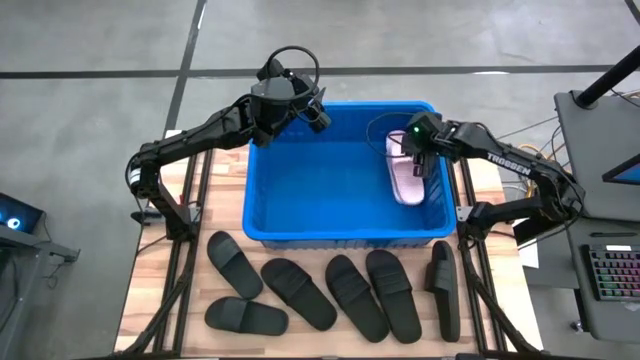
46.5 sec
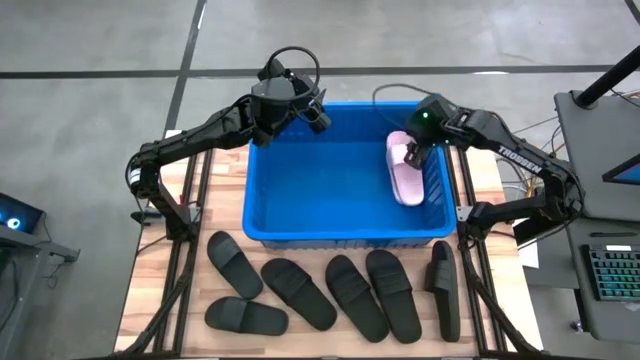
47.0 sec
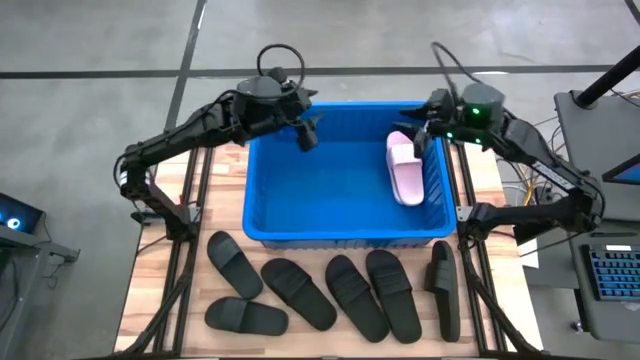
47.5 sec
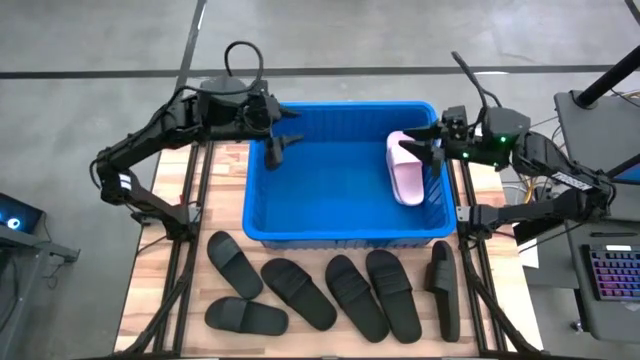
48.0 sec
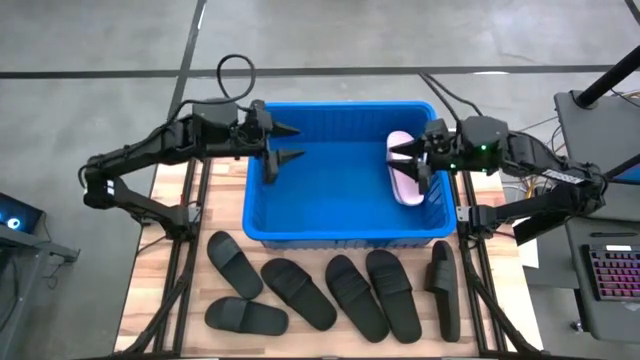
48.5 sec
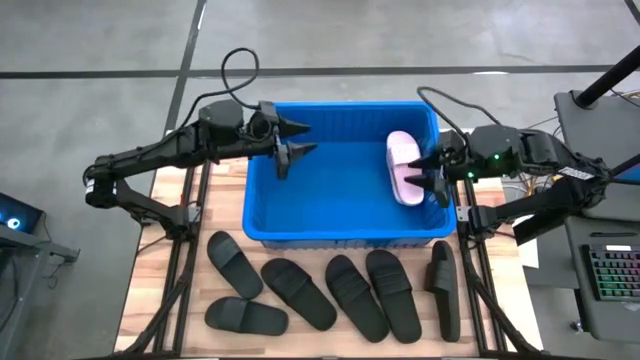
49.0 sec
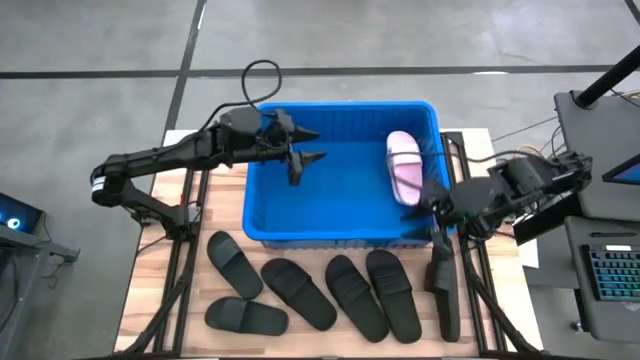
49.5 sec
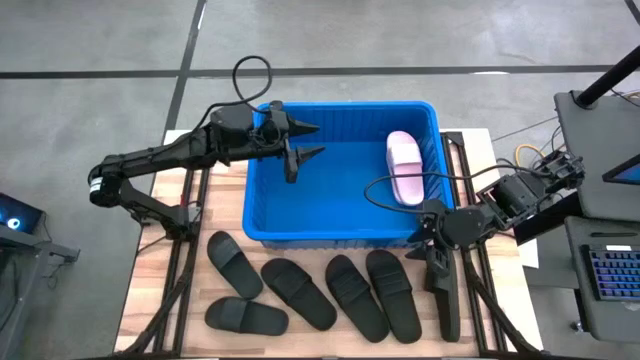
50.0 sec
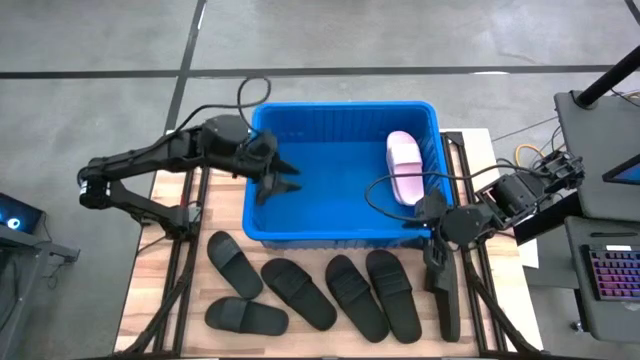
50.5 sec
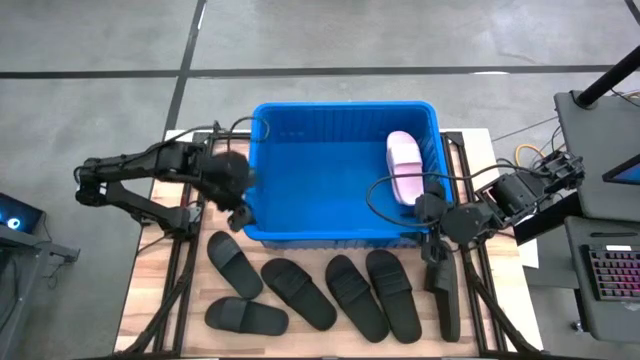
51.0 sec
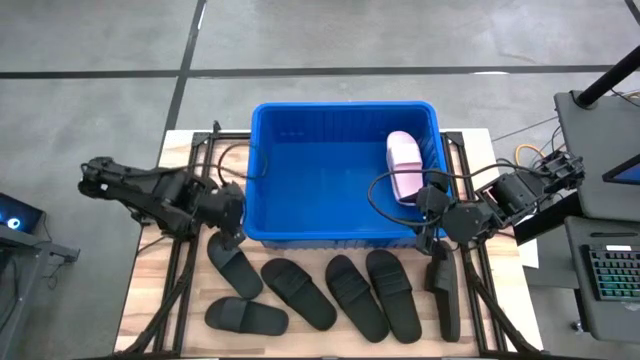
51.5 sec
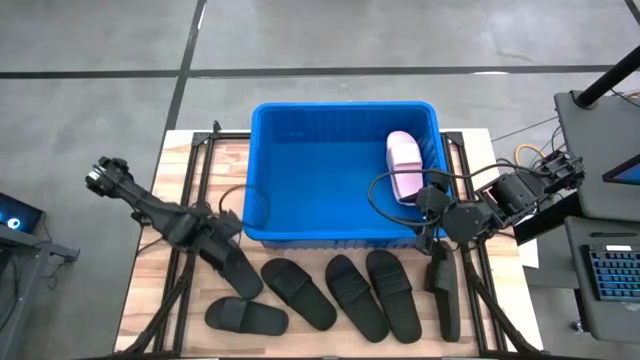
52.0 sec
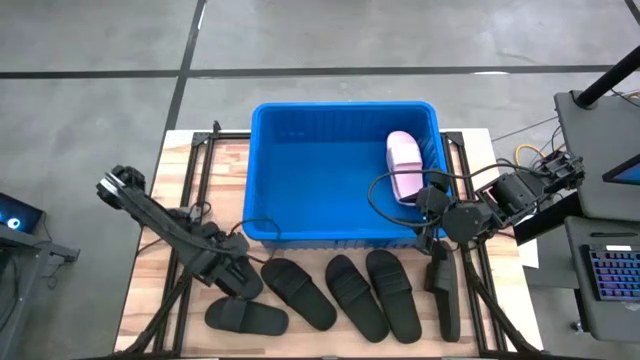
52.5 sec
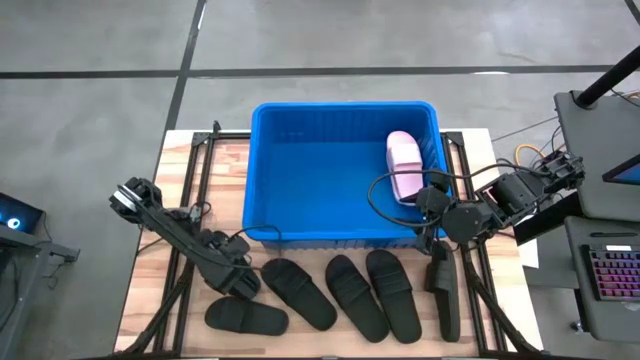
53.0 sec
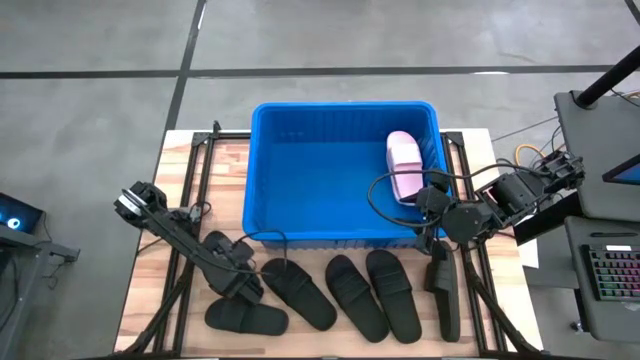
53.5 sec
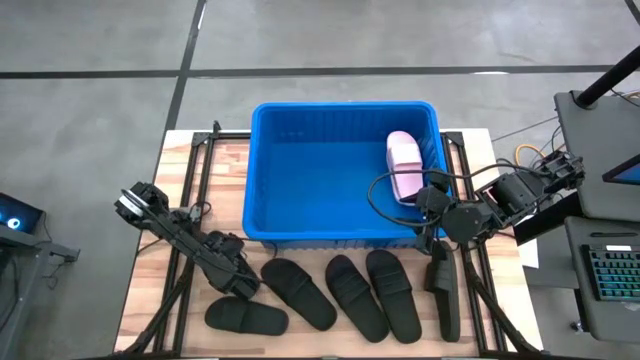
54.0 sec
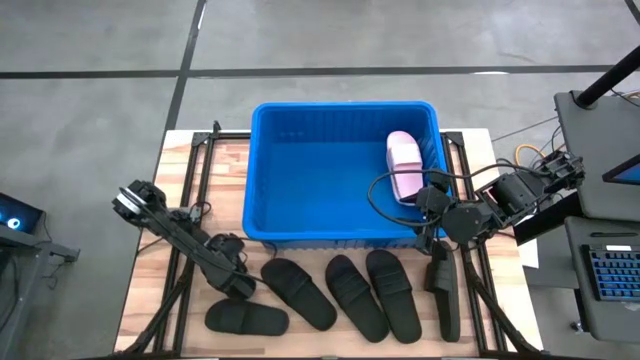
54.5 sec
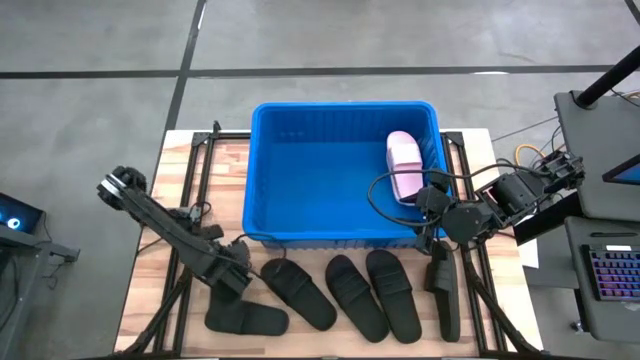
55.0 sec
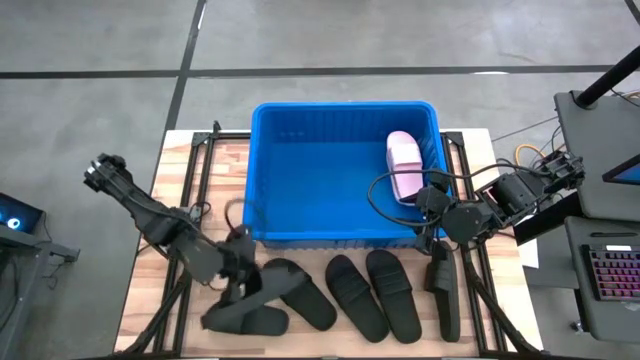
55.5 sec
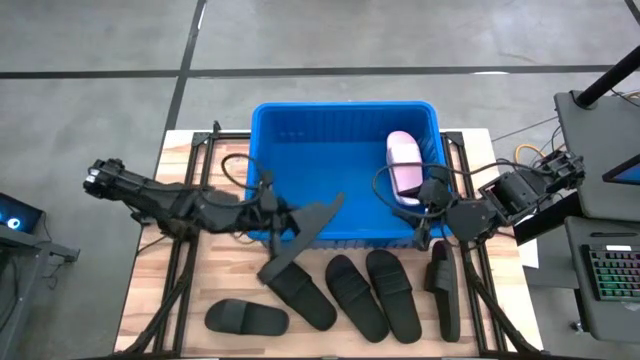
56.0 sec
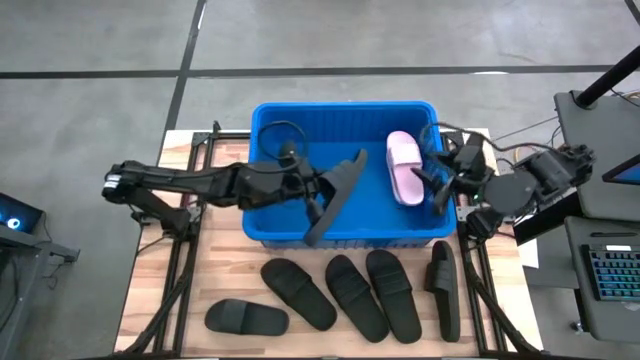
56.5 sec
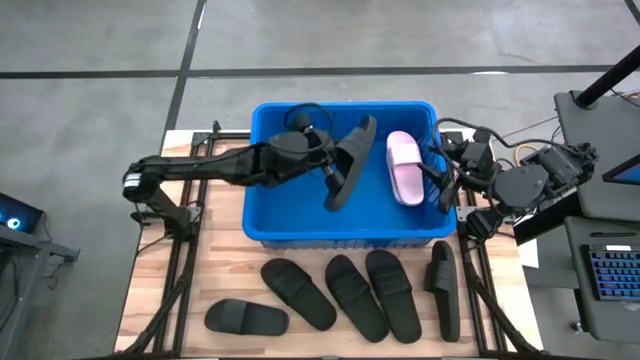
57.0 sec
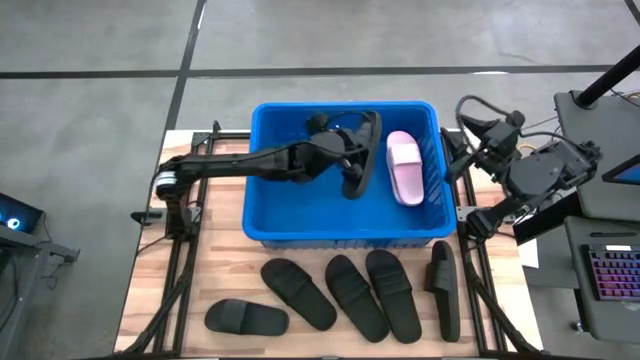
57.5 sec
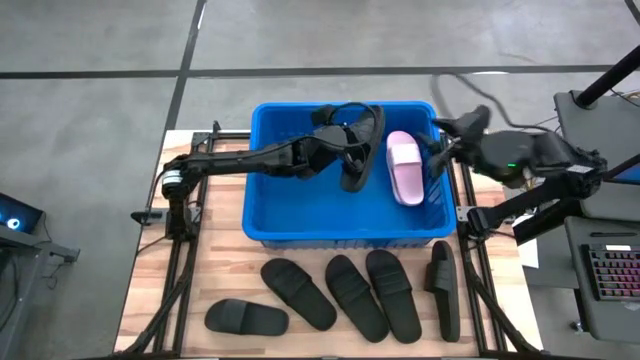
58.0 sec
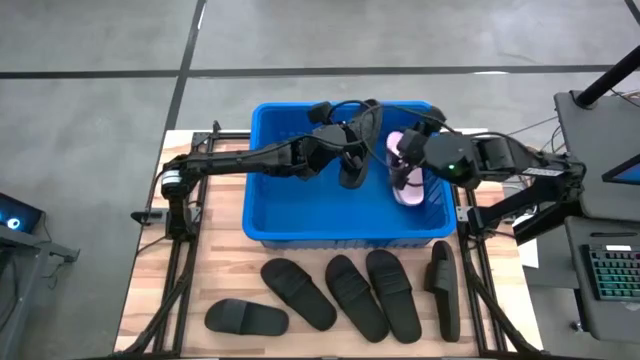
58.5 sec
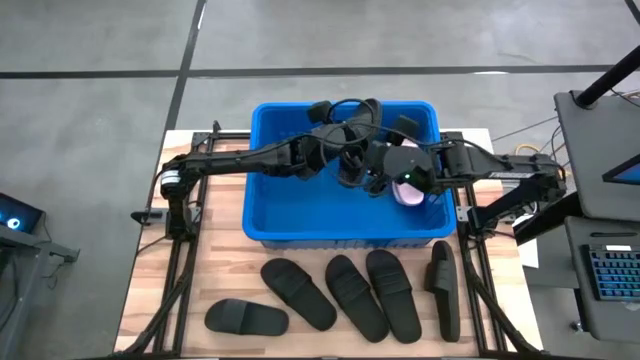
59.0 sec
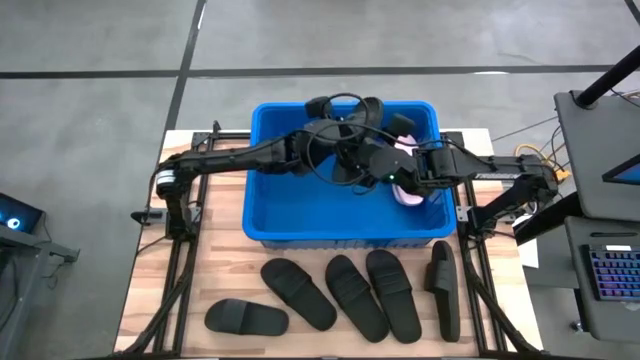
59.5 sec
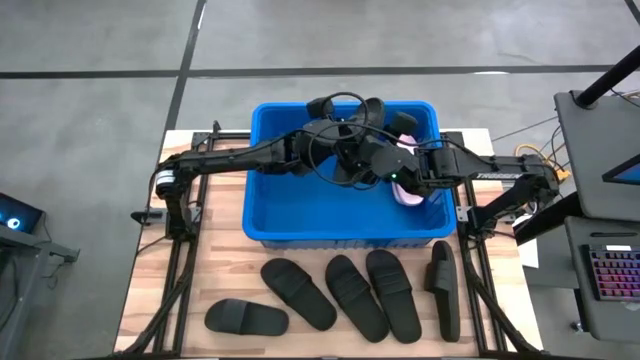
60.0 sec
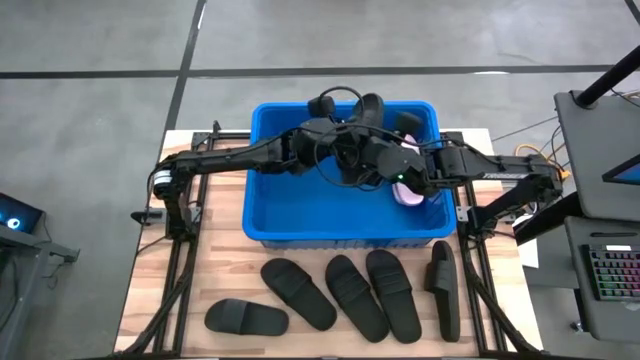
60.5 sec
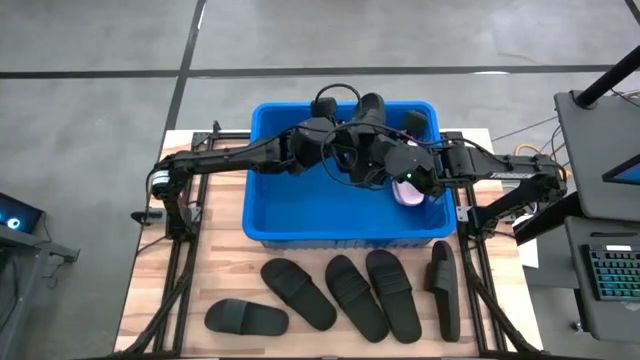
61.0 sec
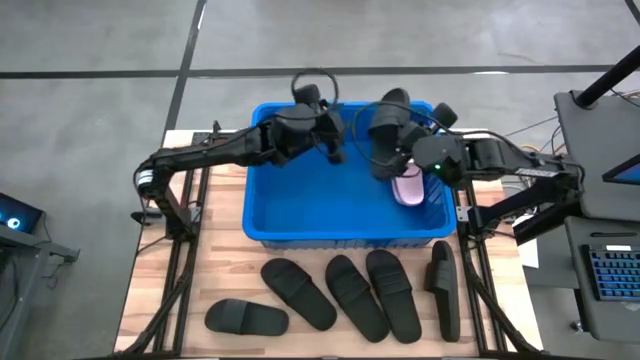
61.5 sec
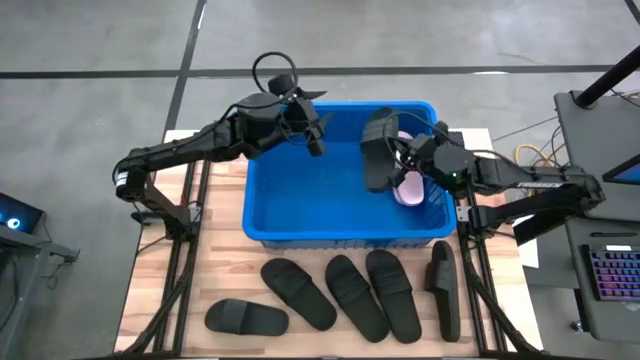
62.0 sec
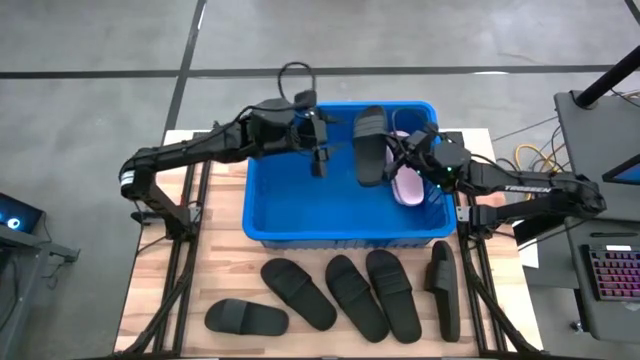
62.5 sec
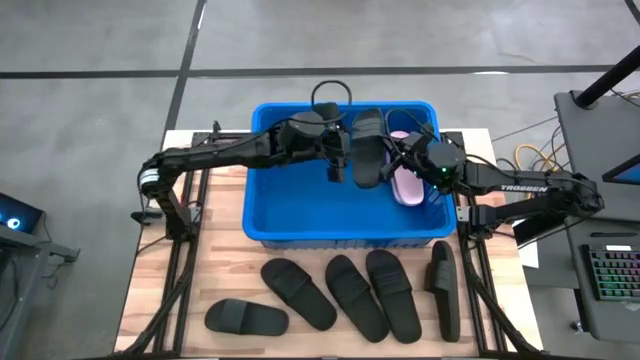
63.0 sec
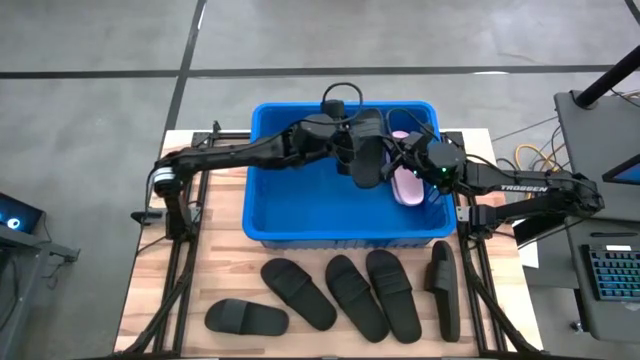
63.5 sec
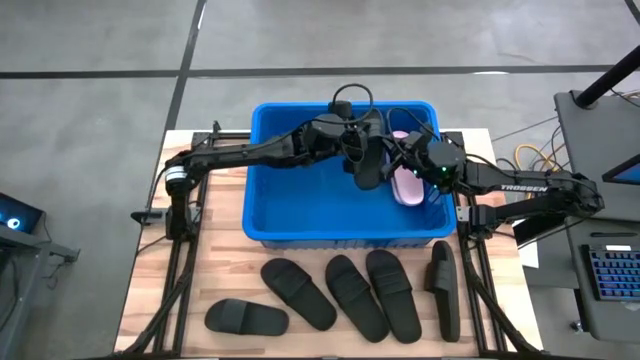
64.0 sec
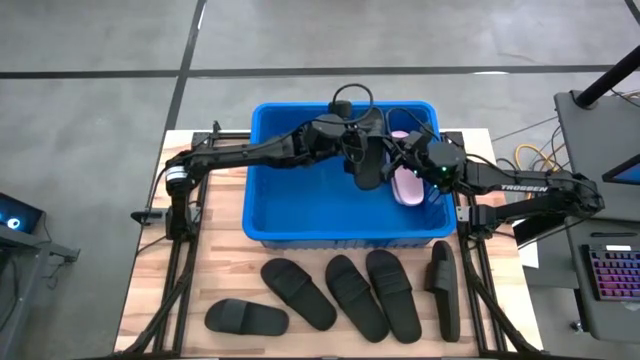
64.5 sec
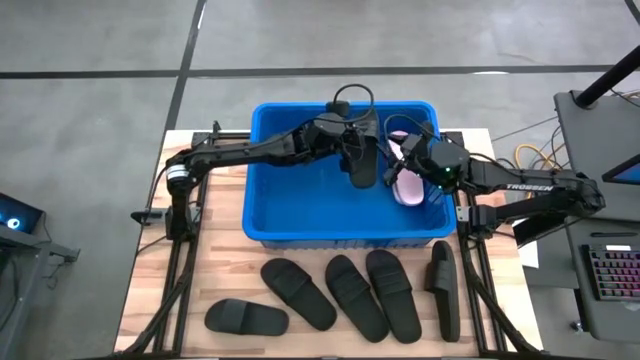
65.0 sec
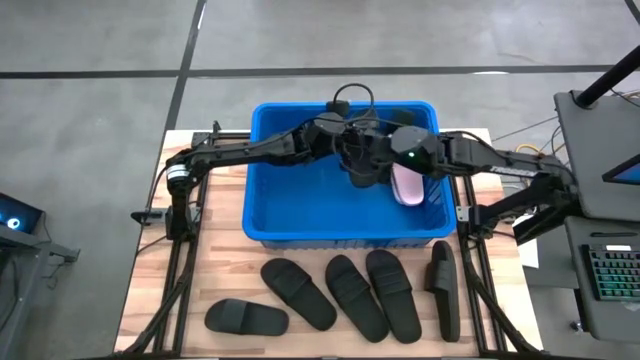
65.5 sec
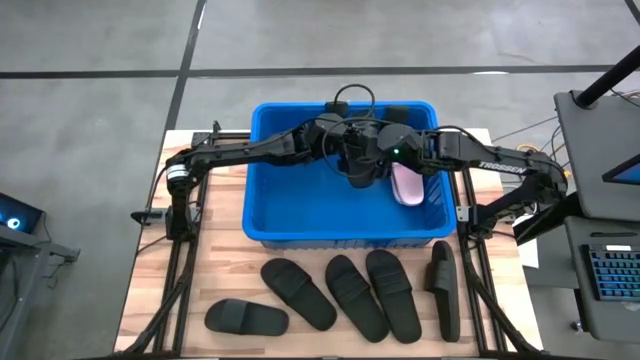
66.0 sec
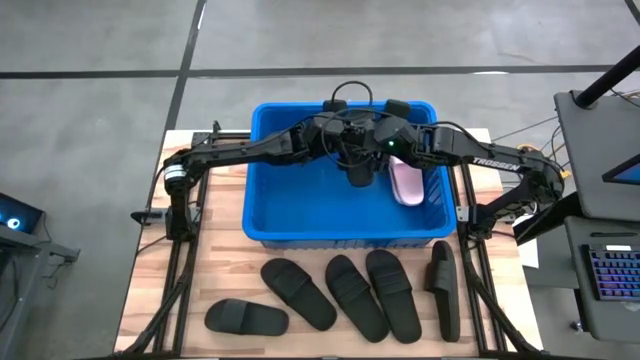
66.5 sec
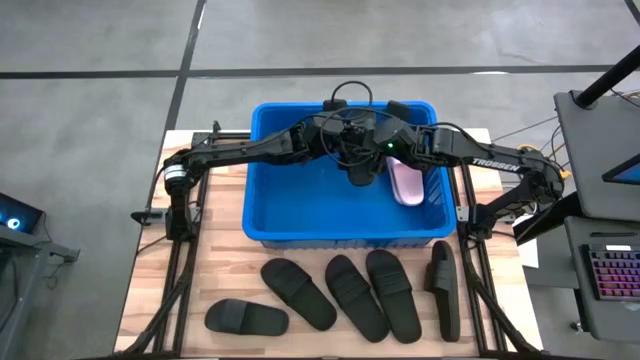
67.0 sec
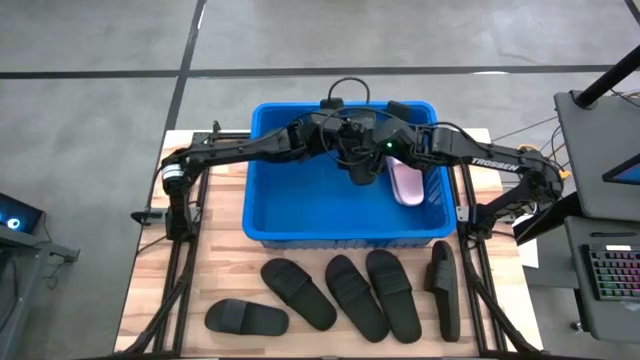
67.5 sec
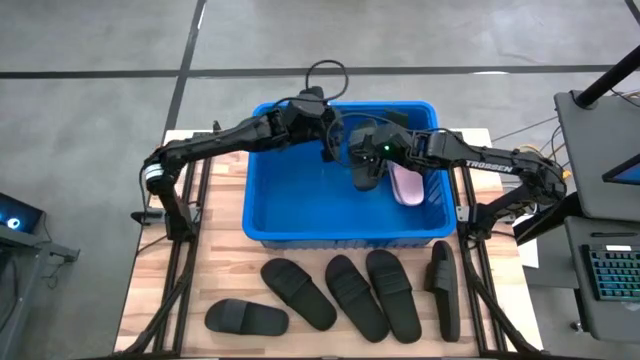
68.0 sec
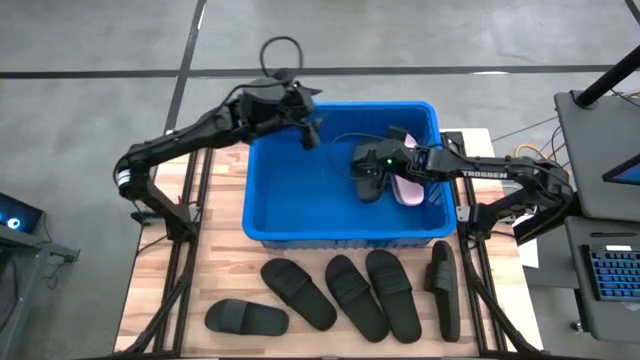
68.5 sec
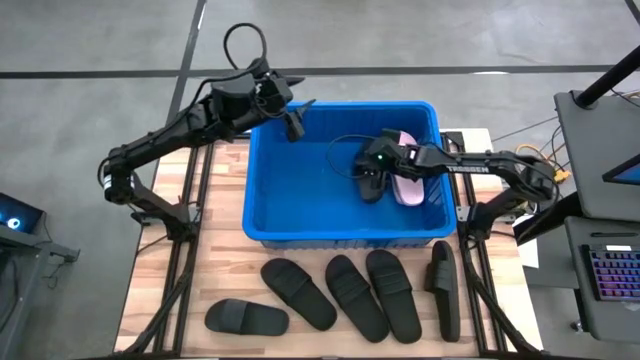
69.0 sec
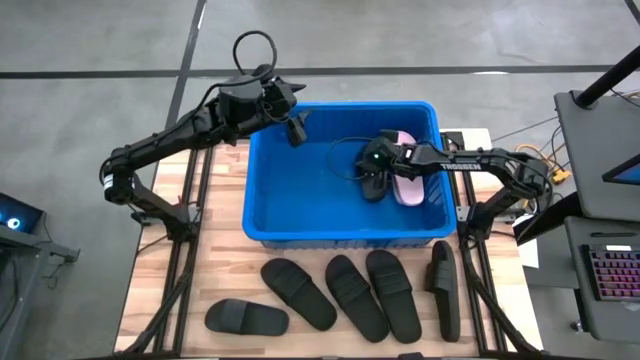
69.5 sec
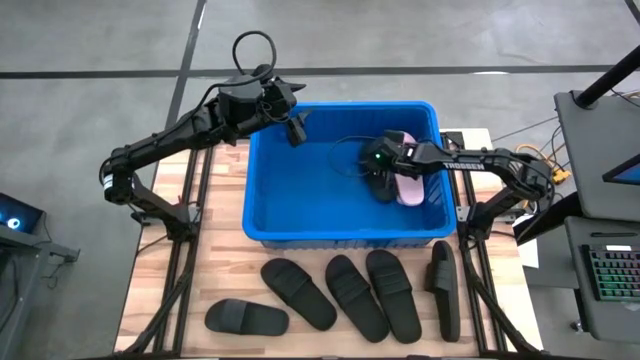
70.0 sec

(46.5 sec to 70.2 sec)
Task: Pick and place slides into bin
Put the black slide into the blue bin
